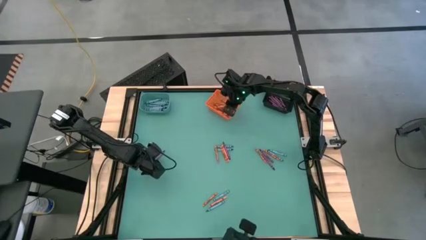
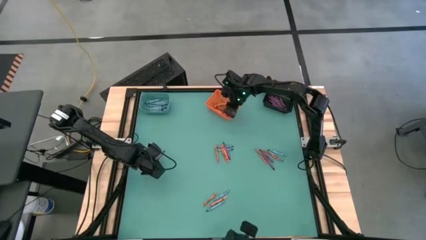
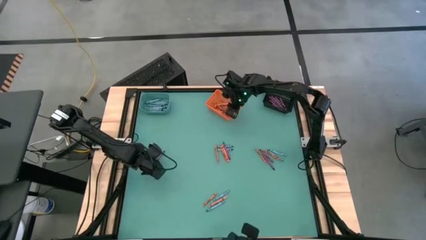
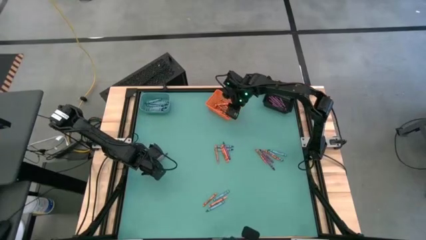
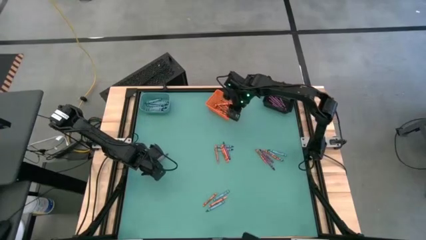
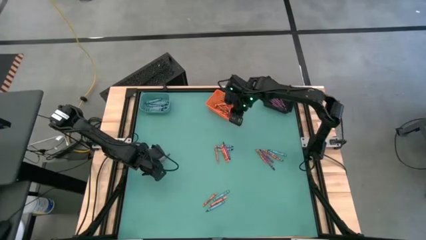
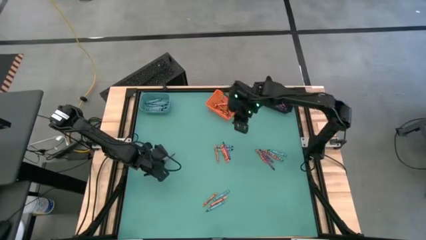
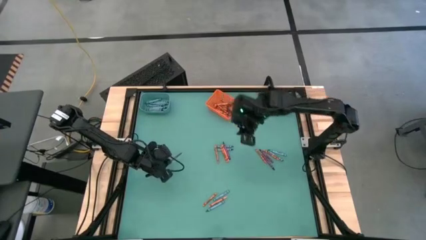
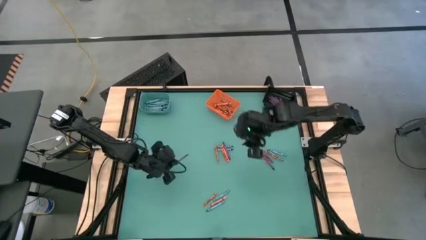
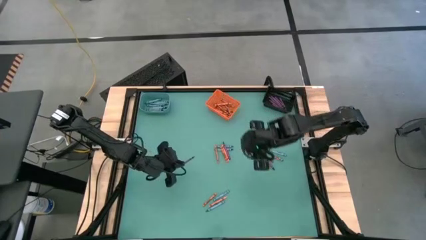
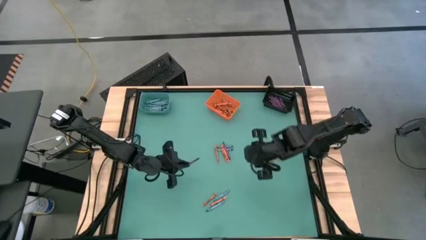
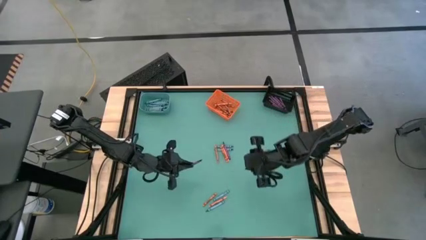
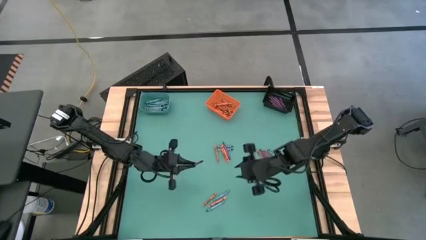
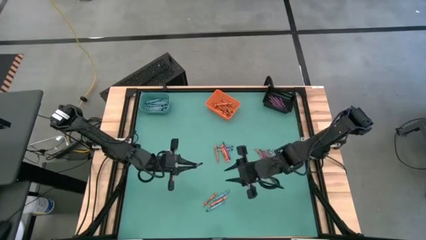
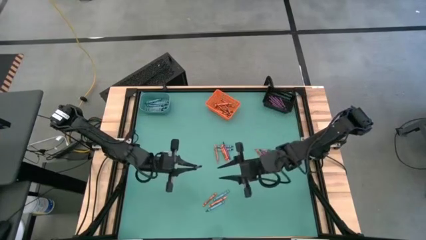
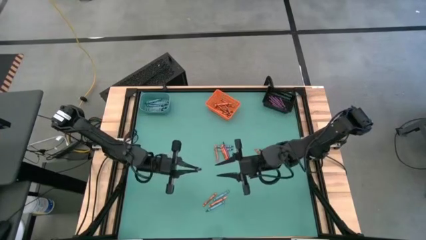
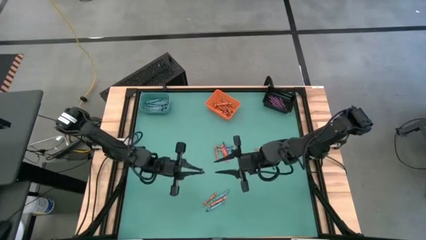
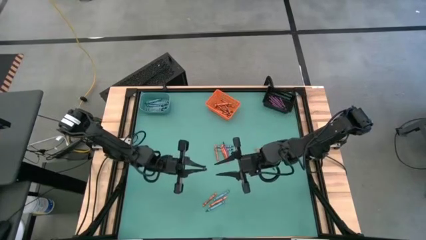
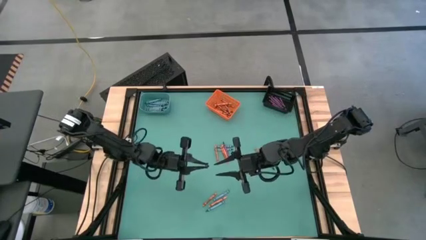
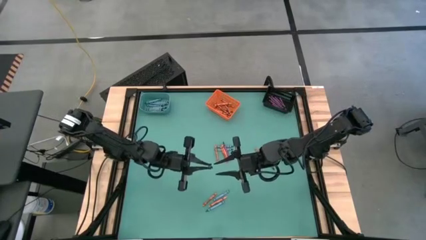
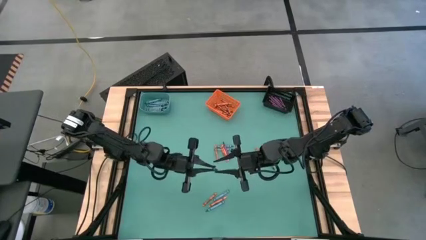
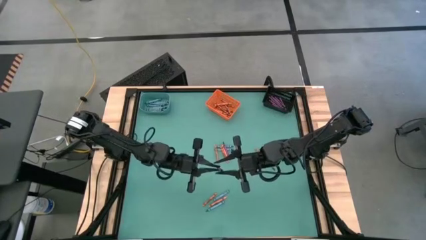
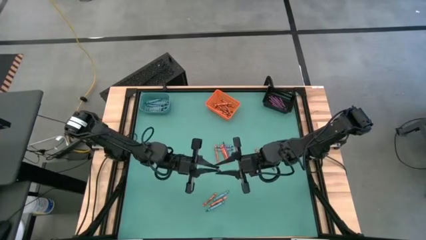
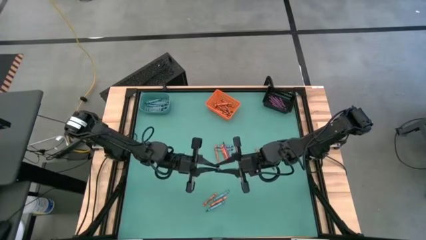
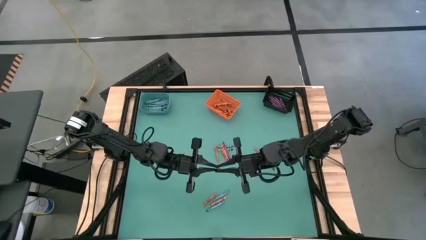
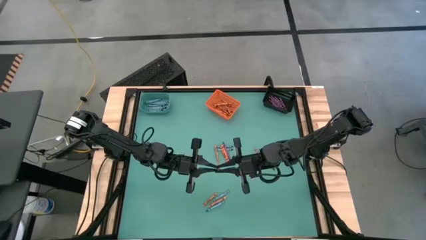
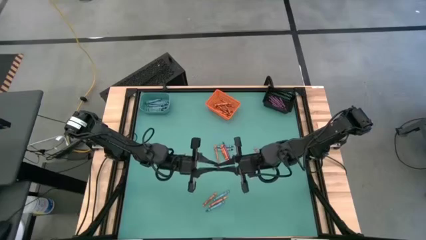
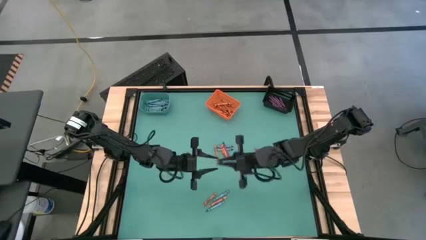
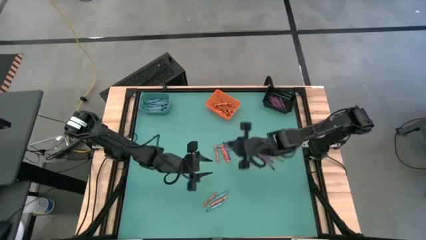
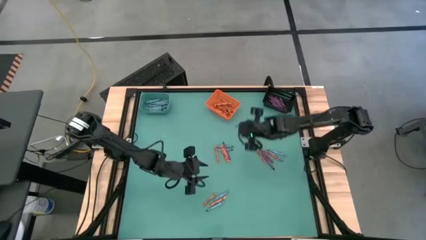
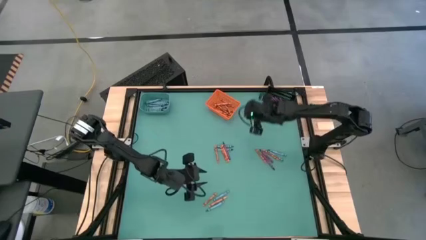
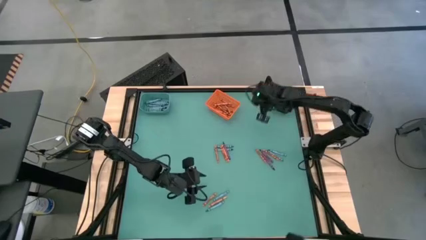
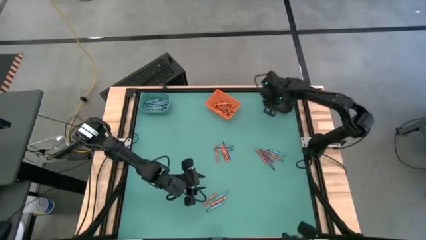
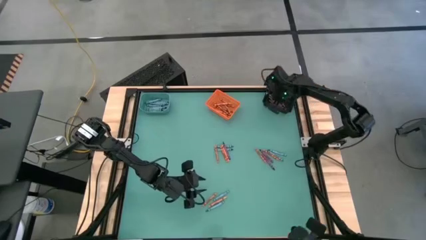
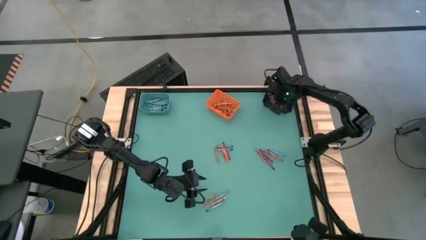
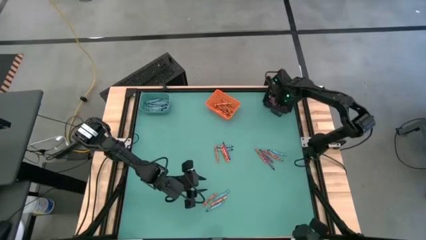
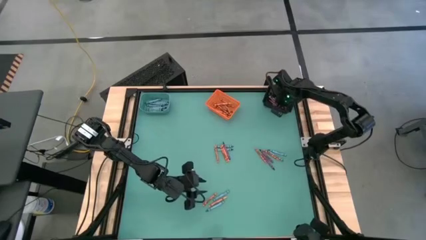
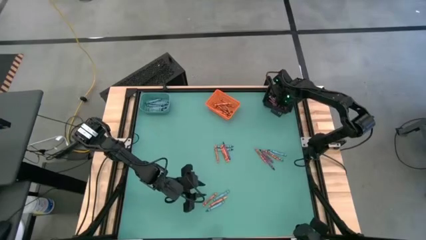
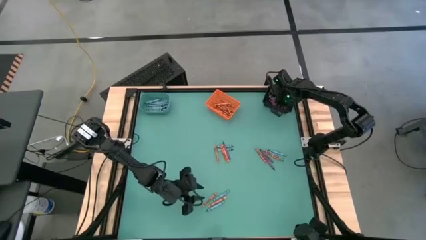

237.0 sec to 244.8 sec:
Task: Sort crayons
Put the violet crayon into the black bin

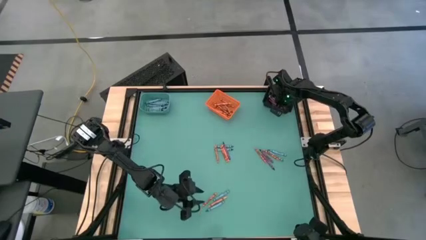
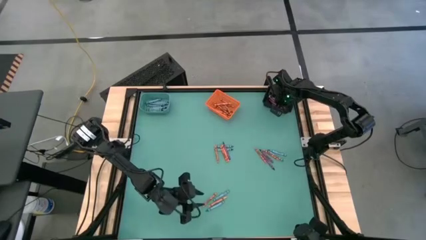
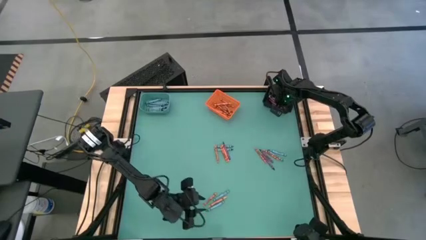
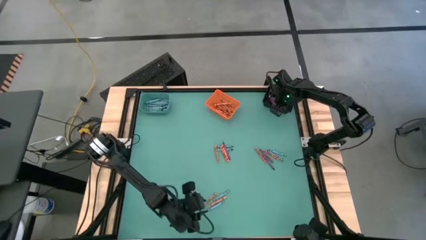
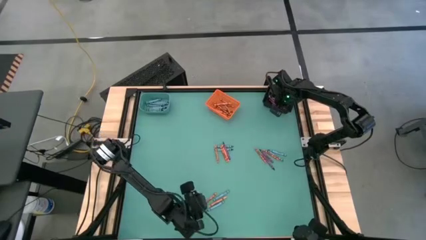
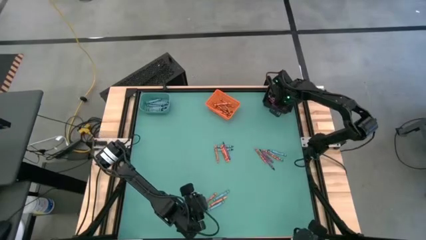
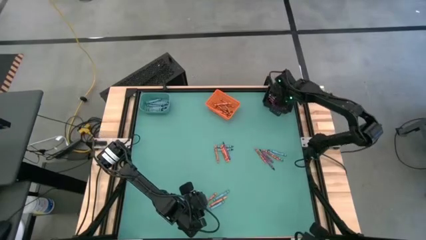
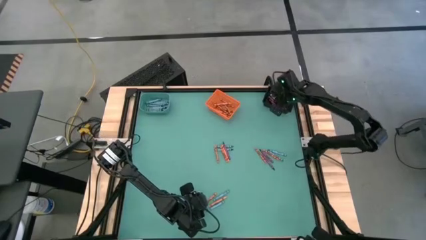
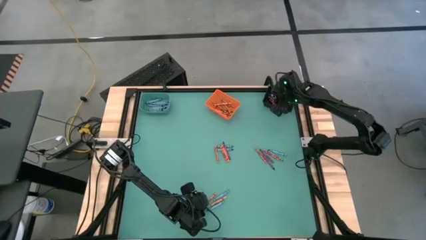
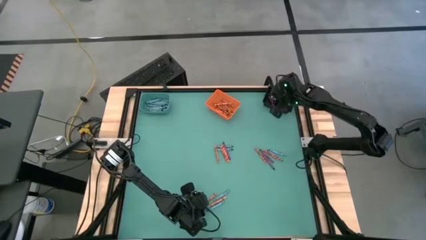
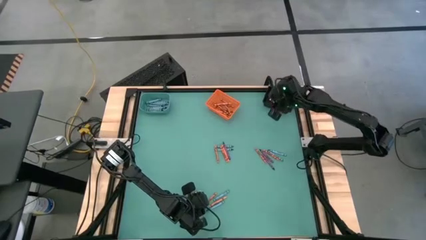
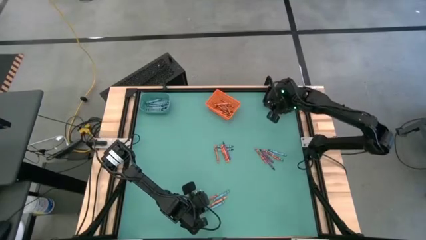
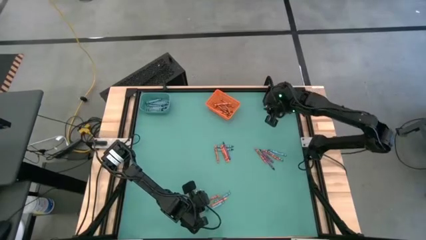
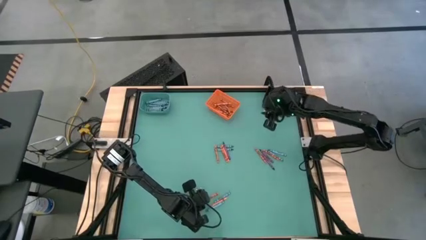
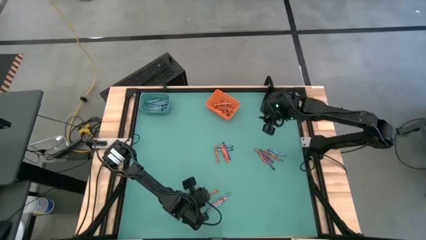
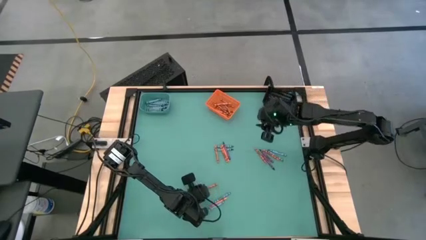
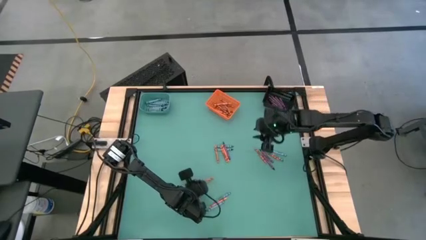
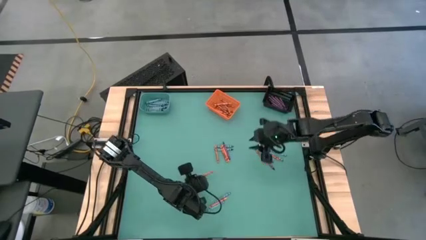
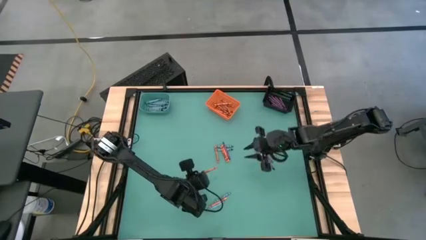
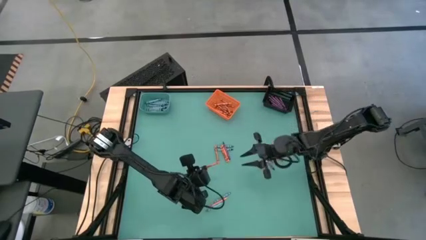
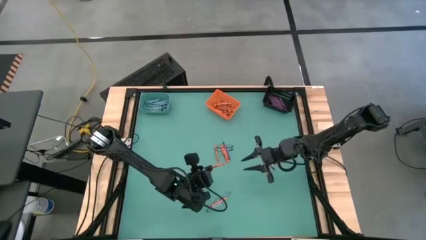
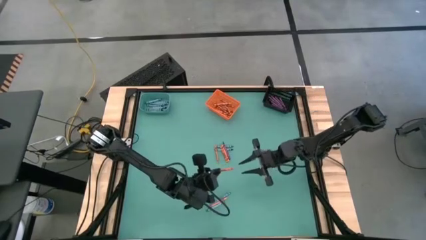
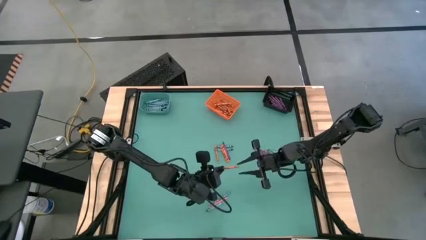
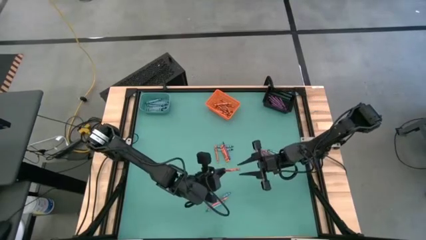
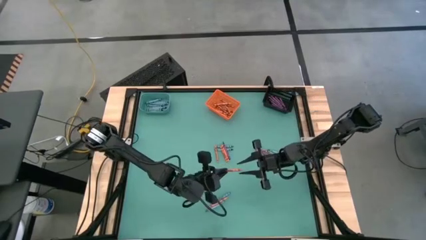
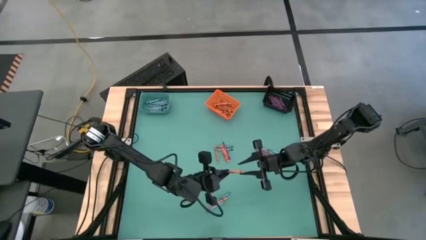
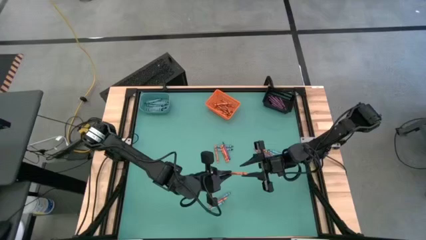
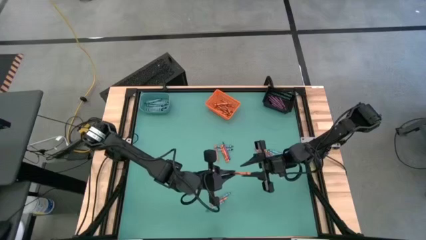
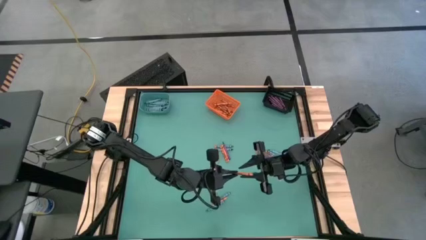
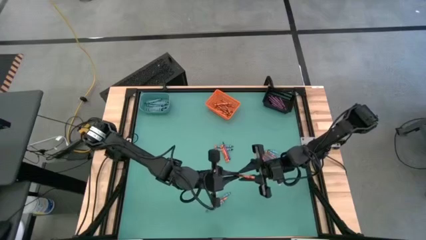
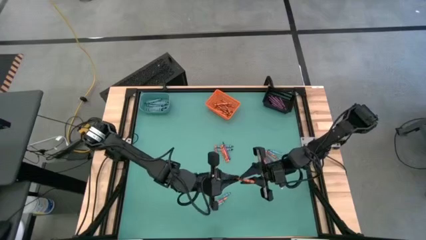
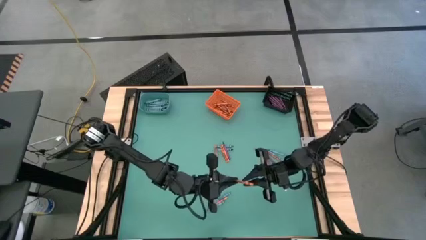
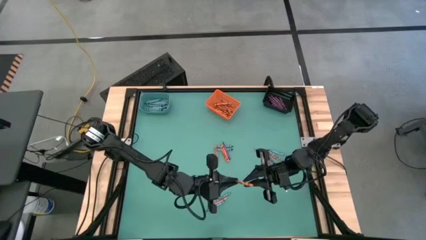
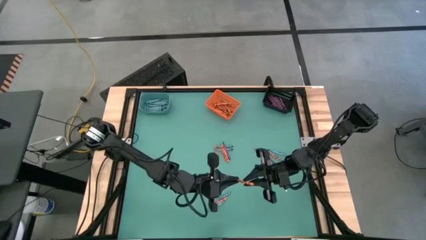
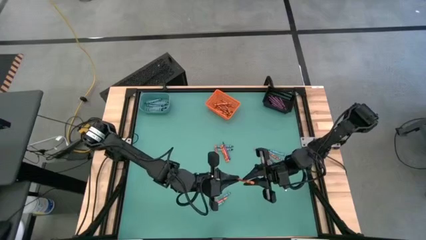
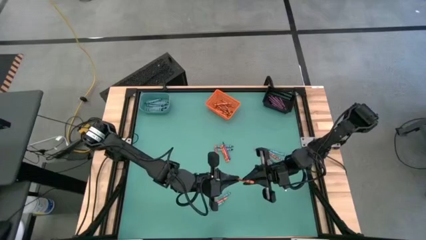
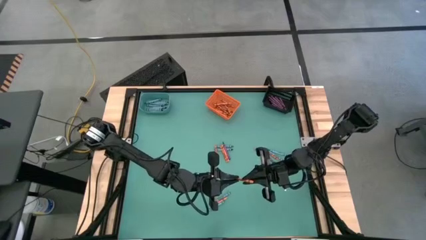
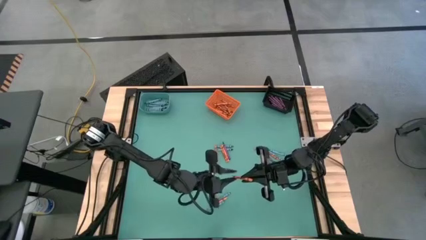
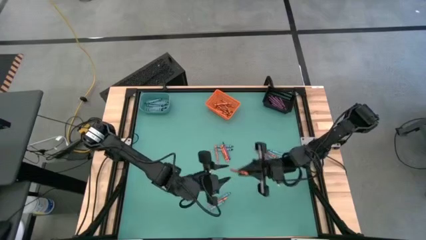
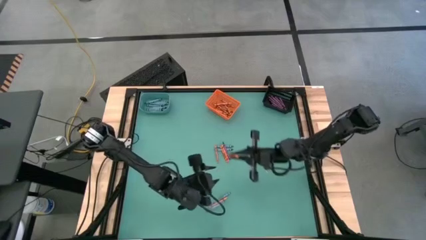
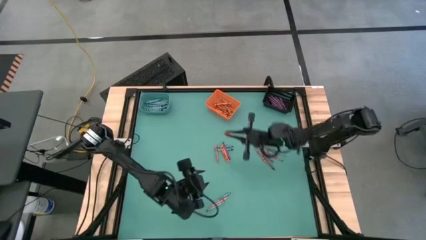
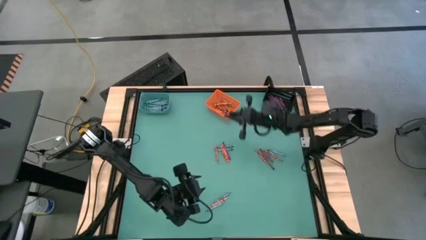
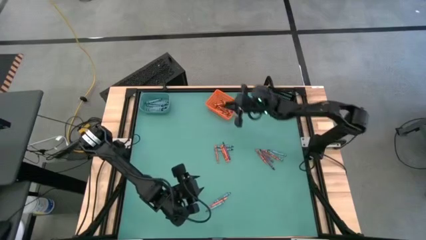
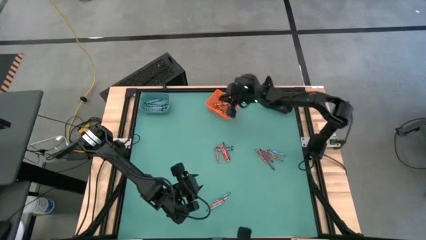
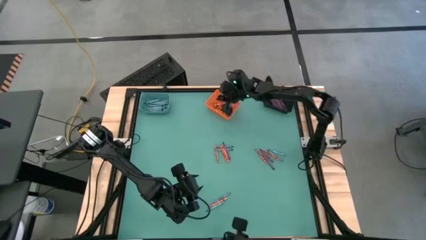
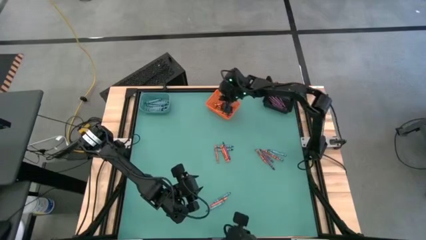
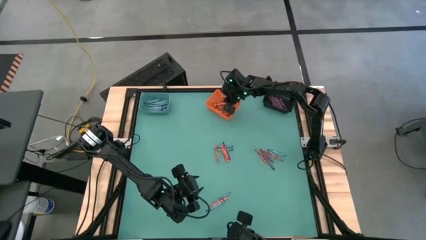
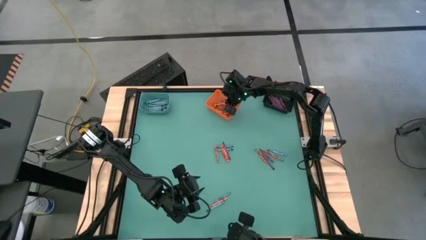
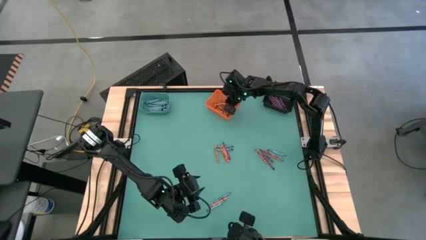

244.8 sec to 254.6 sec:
Put the orange crayon into the orange bin
